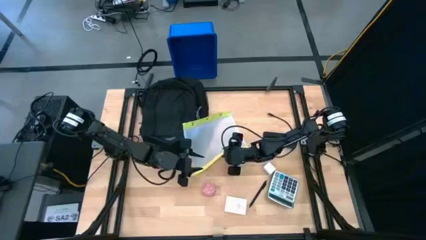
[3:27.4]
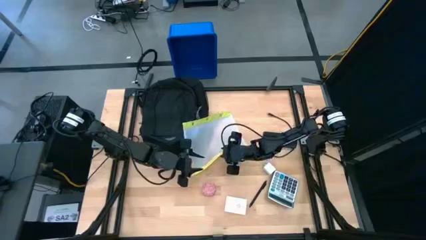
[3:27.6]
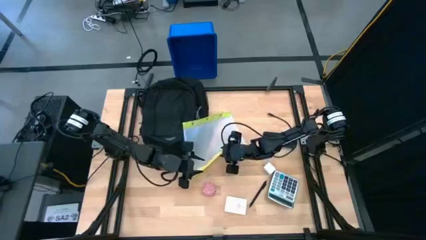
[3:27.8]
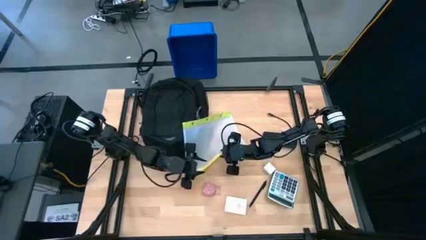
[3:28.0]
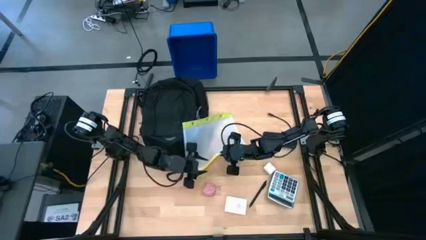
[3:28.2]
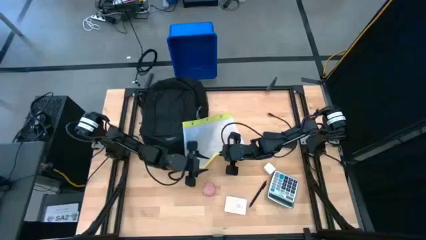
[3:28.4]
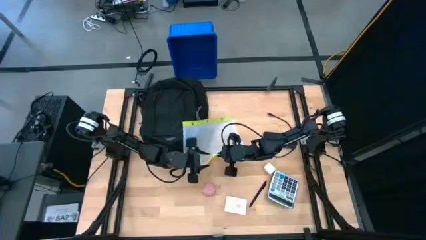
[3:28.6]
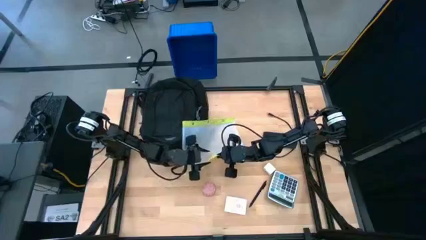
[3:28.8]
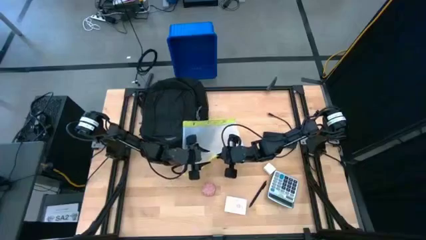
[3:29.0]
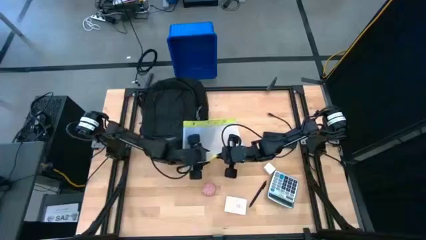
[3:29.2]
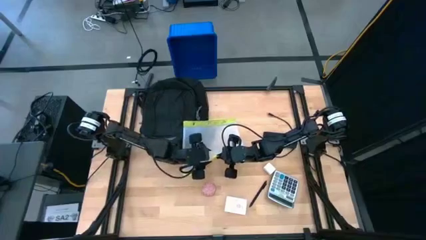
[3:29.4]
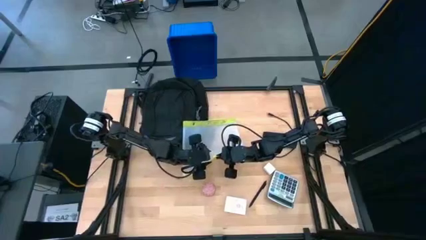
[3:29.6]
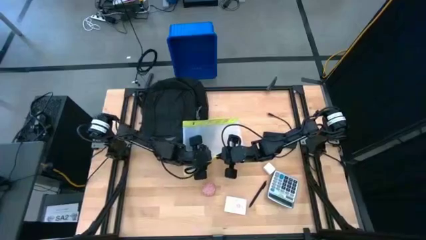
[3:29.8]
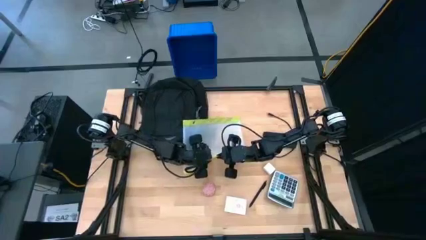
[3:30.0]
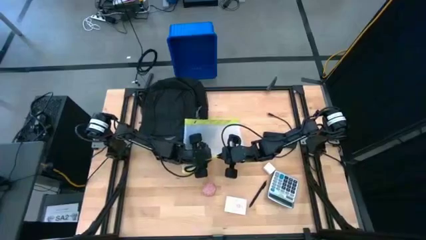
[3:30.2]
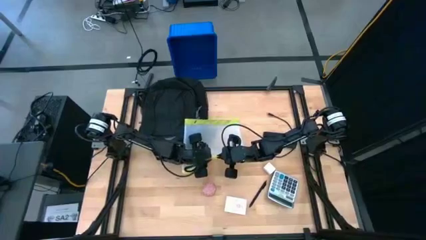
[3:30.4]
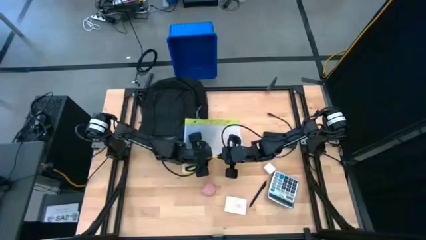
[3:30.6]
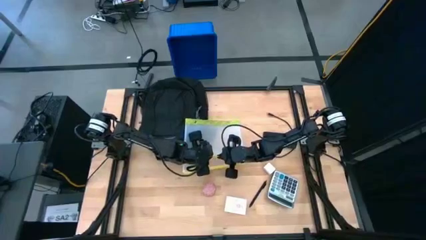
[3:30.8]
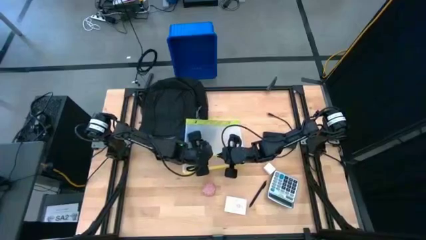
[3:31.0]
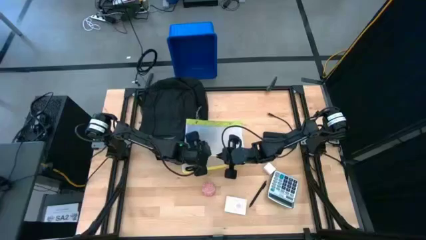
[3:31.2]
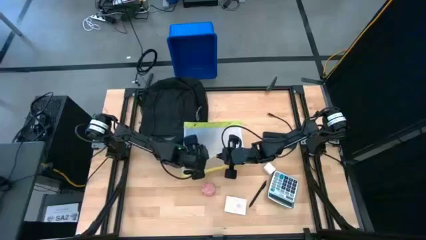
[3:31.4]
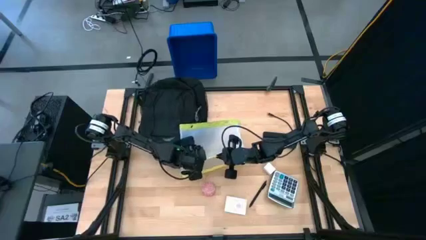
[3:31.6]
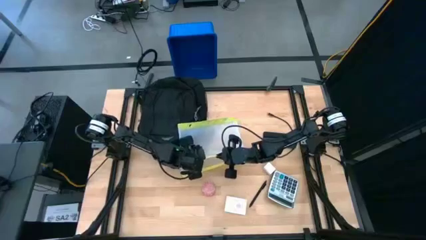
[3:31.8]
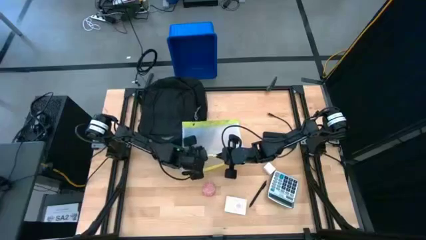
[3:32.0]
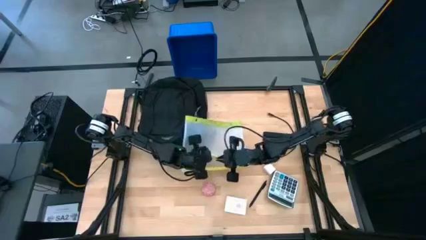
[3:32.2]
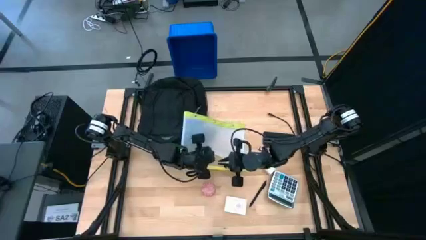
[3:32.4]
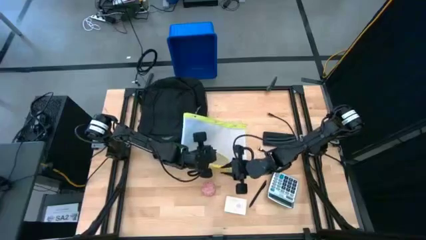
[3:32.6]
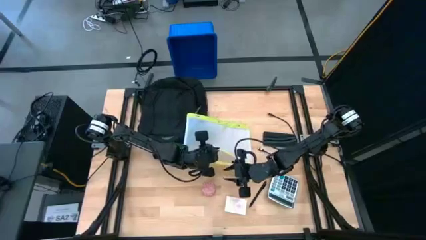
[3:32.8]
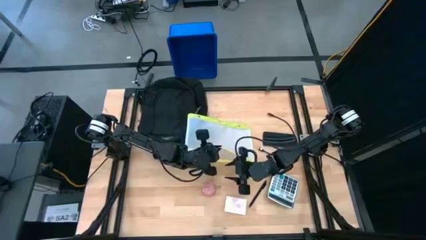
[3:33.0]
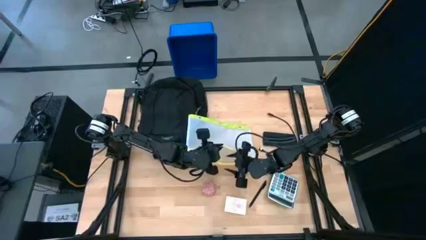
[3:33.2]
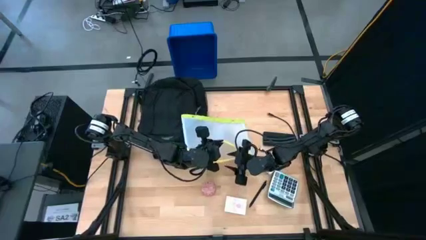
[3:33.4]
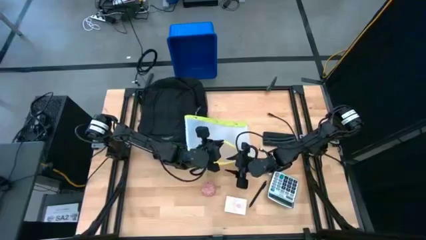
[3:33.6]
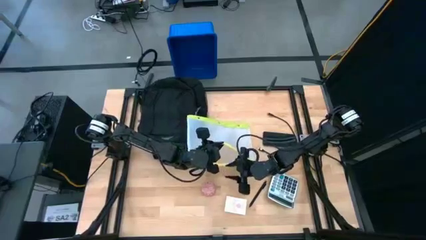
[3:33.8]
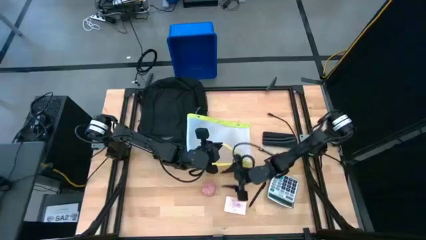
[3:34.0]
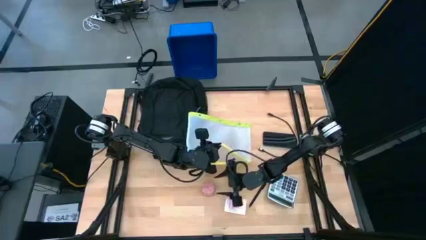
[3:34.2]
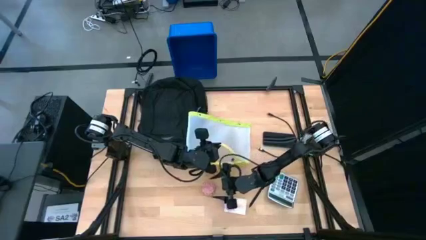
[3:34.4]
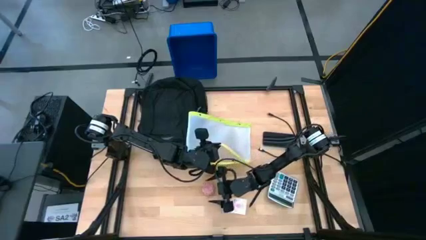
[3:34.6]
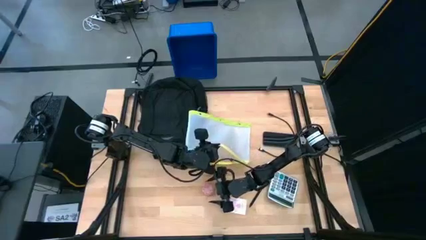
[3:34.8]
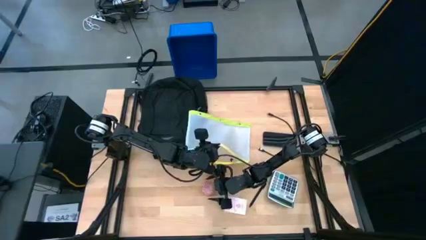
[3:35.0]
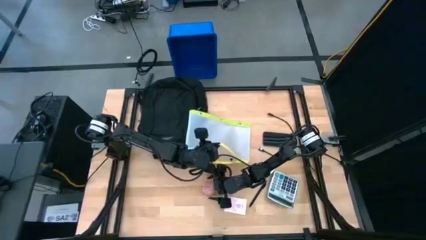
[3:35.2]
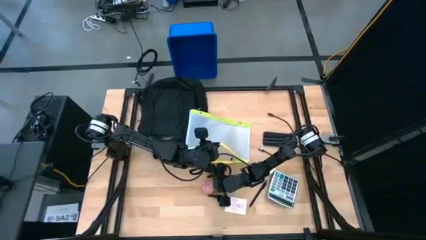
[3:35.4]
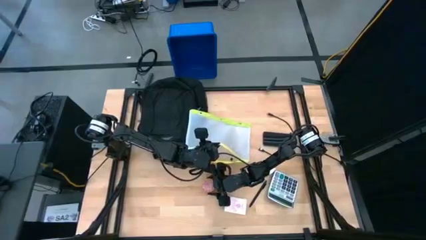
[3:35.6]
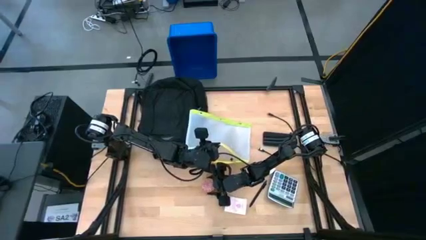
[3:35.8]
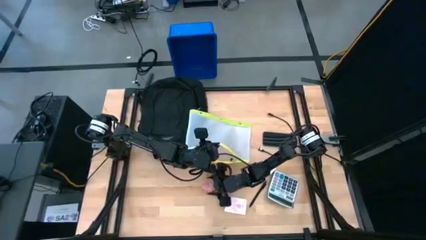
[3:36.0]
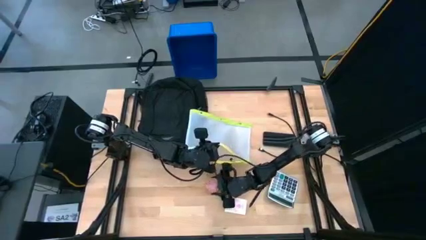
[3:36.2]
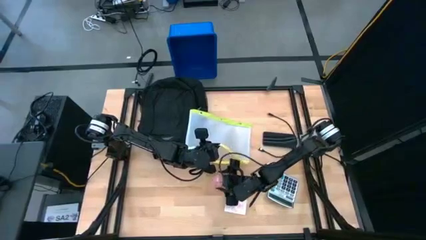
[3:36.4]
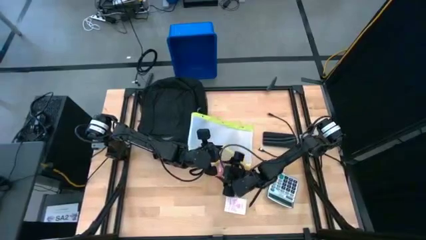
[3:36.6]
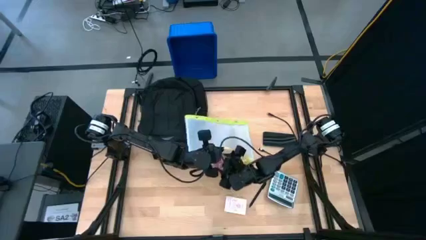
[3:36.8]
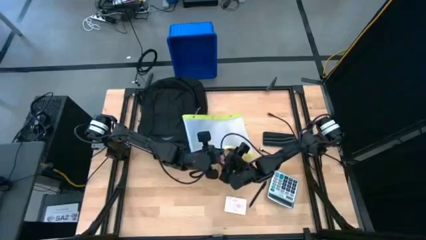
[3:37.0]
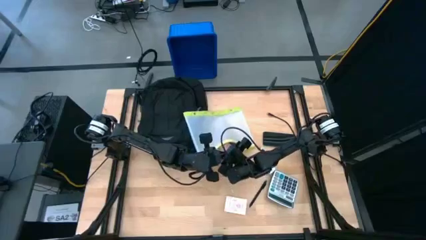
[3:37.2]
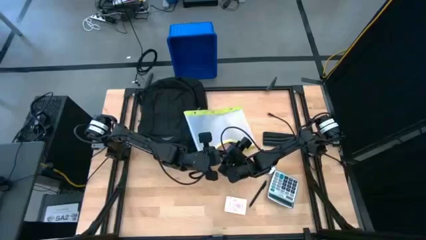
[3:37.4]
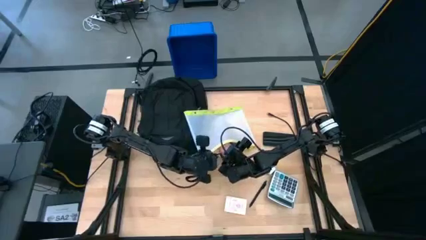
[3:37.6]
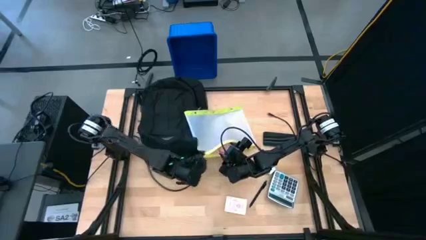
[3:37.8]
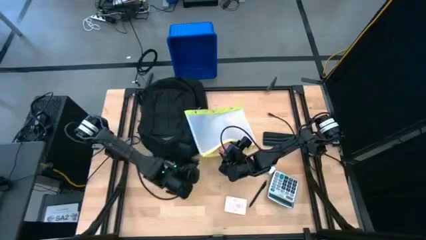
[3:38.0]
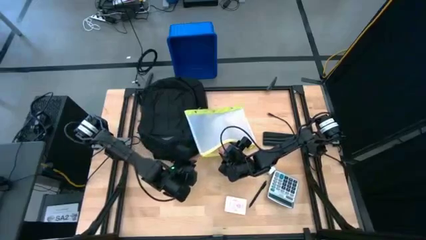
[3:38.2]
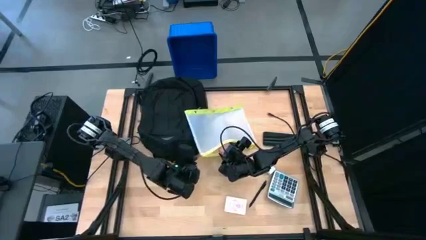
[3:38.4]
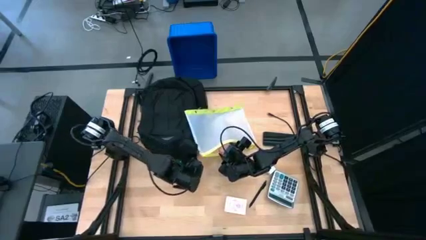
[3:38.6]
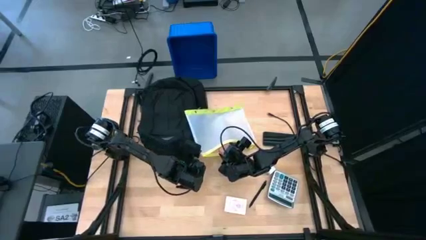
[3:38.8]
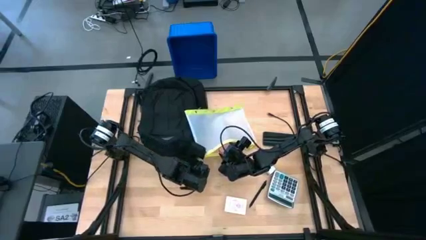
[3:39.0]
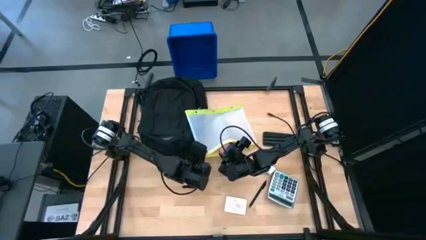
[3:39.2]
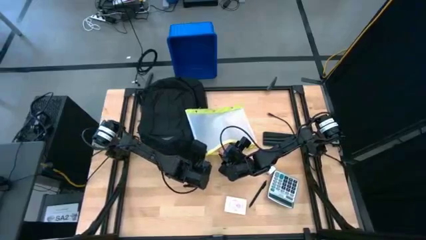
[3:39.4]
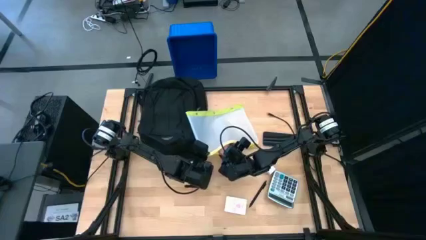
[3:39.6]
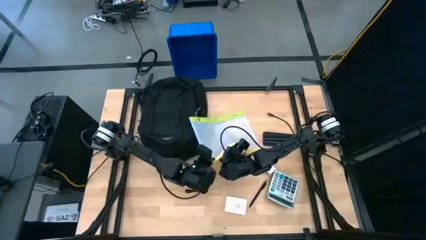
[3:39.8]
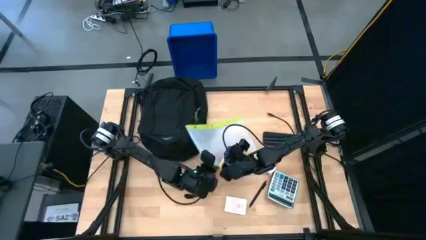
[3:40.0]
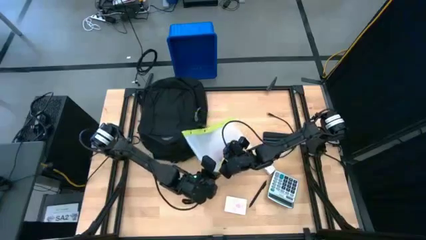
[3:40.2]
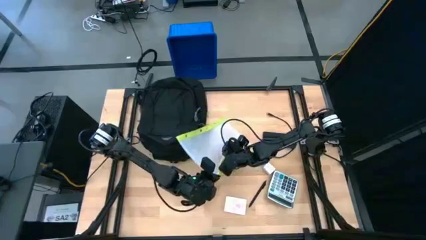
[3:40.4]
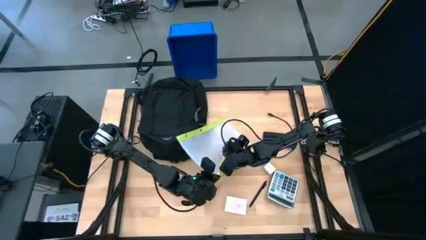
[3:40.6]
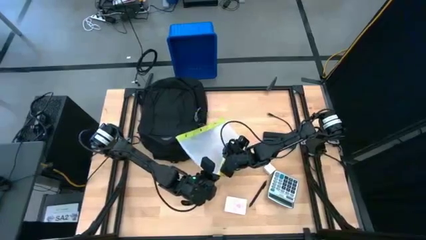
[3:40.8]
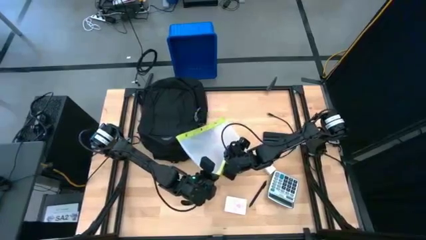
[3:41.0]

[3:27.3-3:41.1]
Task: Unpack backpack
Put the red urn into the zip lock bag

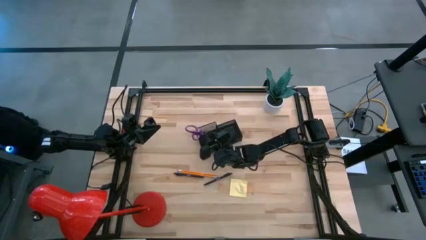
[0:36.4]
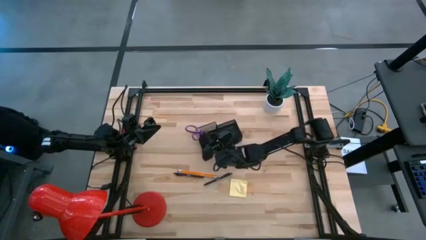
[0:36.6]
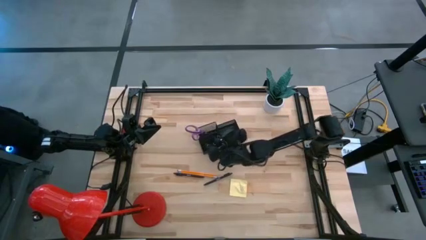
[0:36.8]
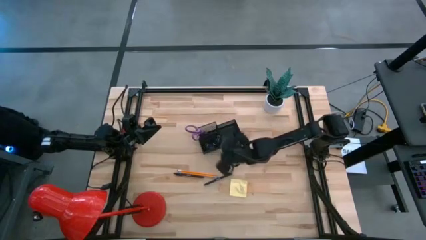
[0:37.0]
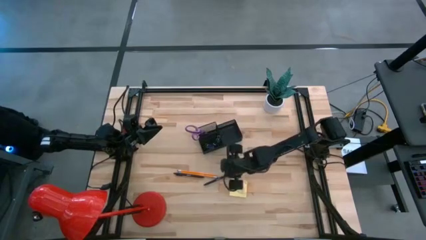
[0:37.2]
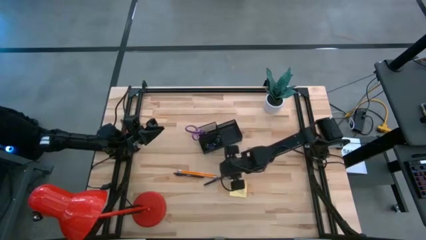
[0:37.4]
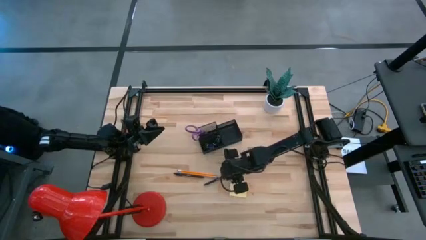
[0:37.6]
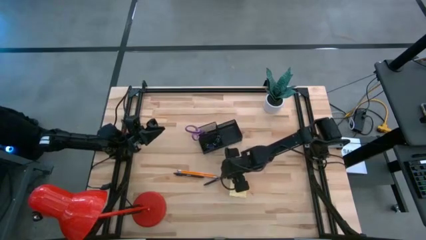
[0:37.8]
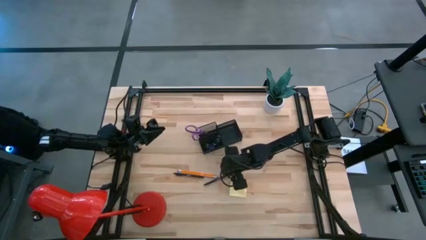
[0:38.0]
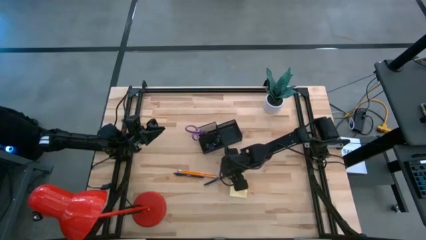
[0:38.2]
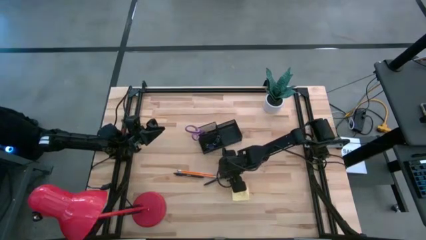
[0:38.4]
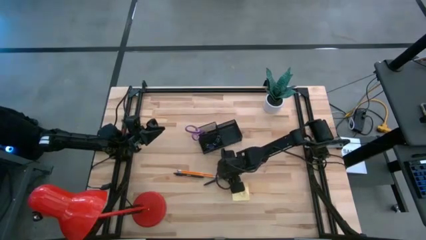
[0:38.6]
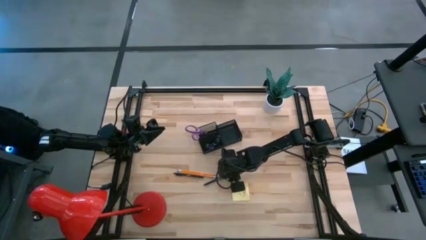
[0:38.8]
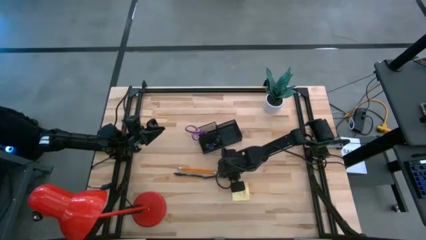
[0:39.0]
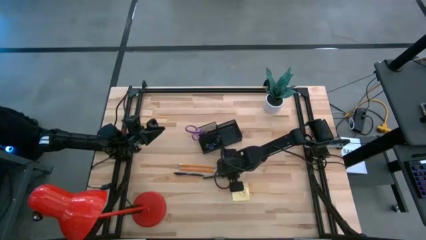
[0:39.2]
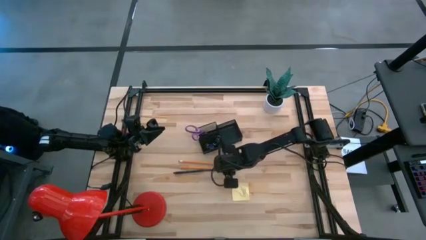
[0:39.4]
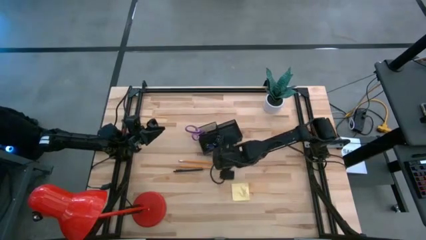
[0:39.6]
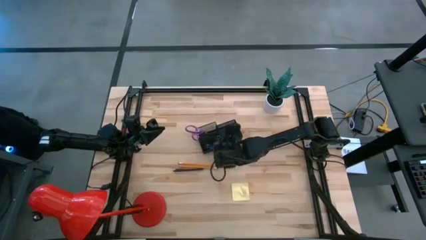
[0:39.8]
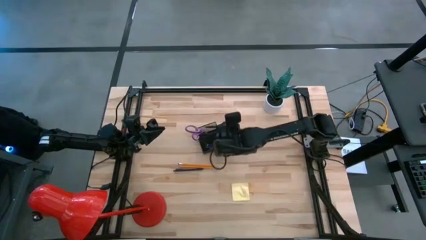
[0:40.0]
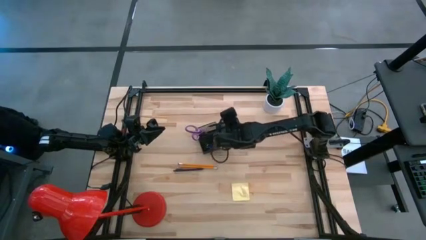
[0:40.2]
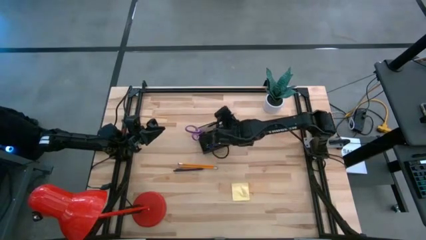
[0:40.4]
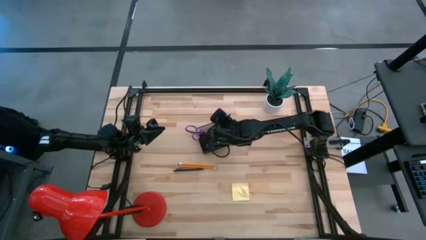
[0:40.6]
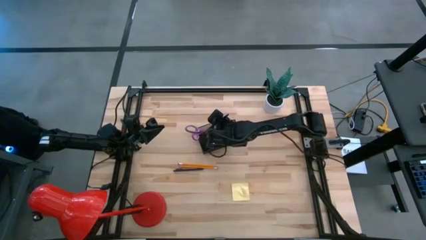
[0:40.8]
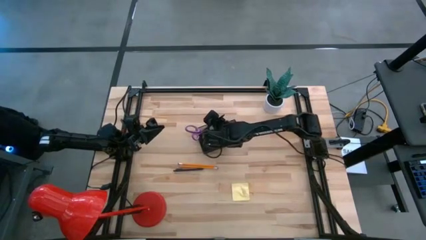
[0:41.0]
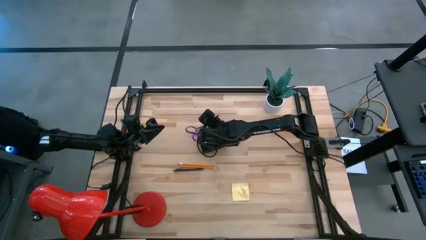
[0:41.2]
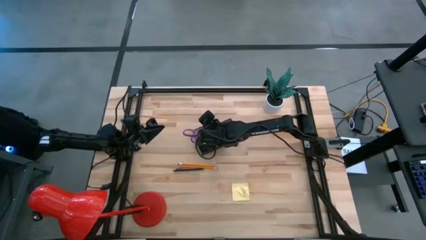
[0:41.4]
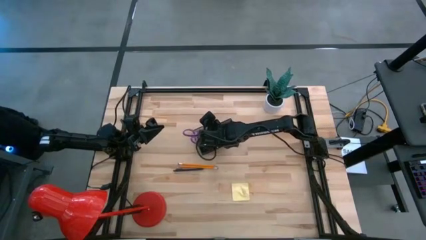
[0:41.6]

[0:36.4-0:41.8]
Task: Pick and place office supplies into organizer
Put the right black ballpen into the black desk organizer
